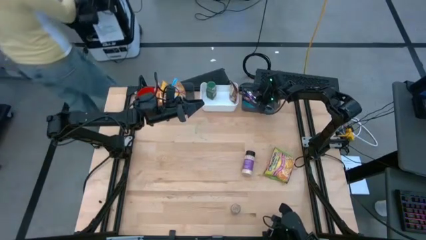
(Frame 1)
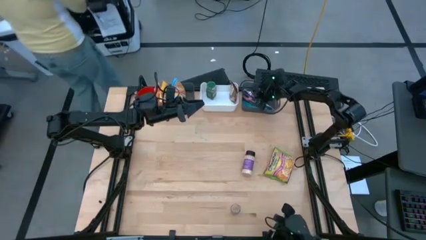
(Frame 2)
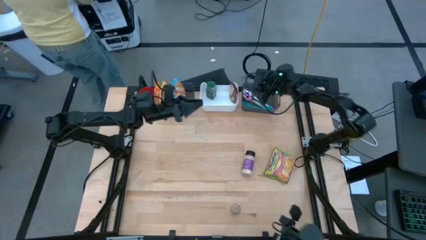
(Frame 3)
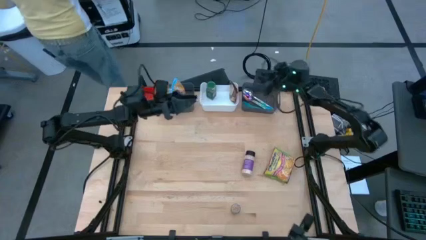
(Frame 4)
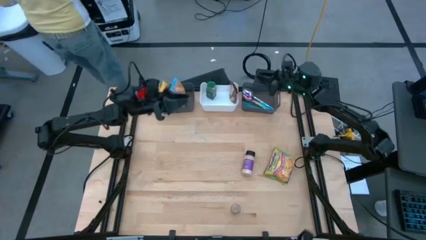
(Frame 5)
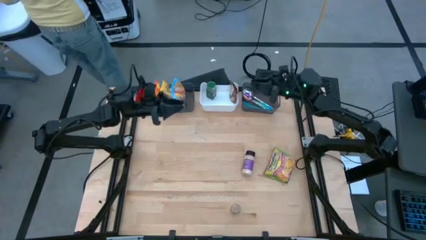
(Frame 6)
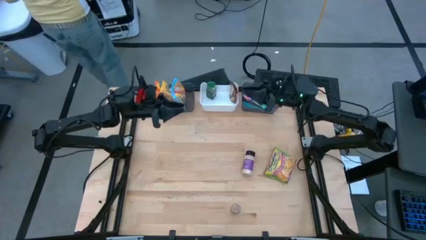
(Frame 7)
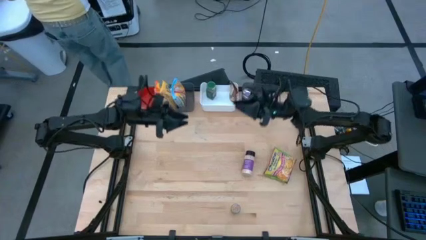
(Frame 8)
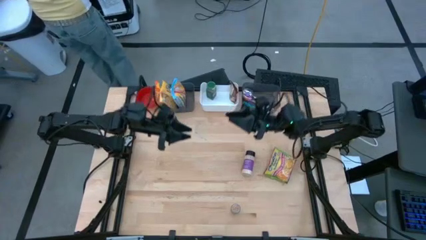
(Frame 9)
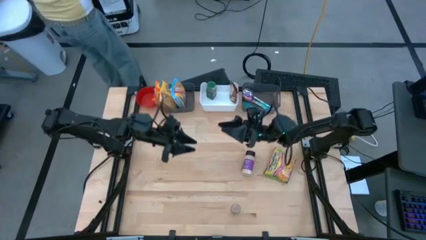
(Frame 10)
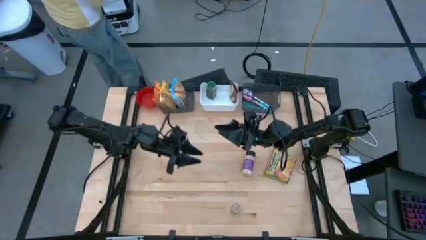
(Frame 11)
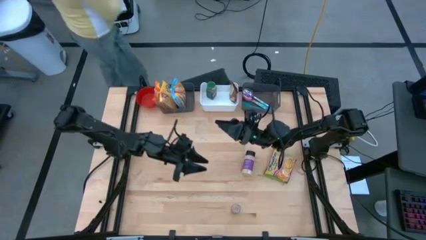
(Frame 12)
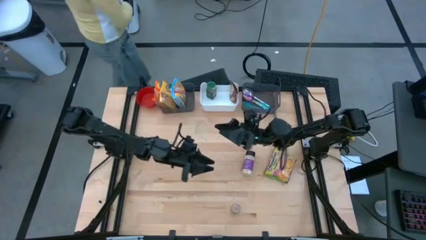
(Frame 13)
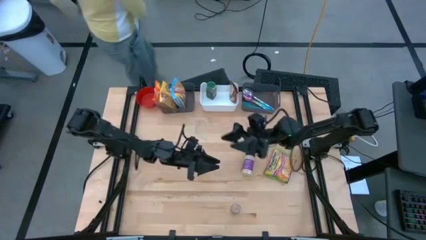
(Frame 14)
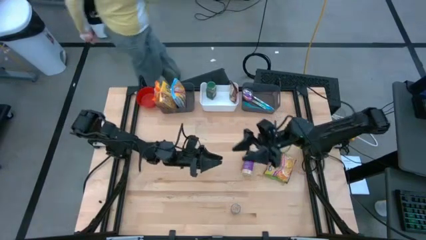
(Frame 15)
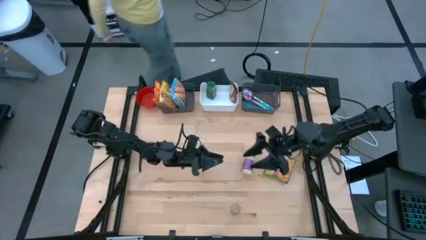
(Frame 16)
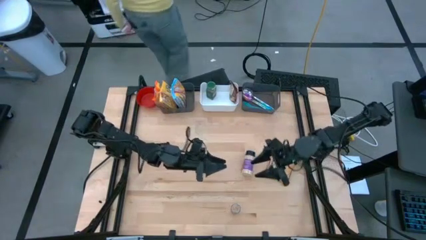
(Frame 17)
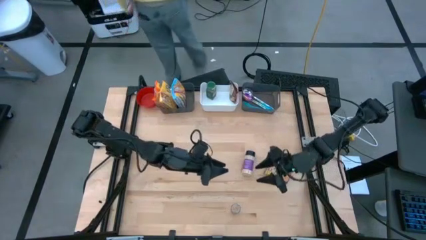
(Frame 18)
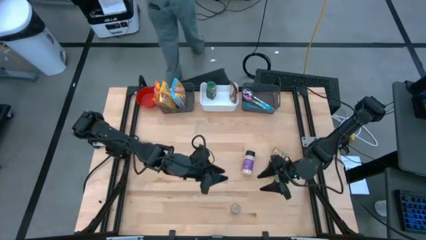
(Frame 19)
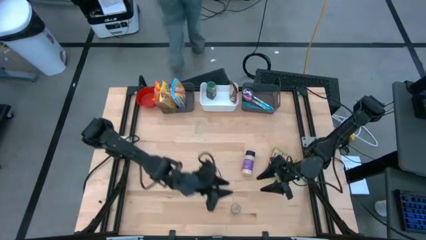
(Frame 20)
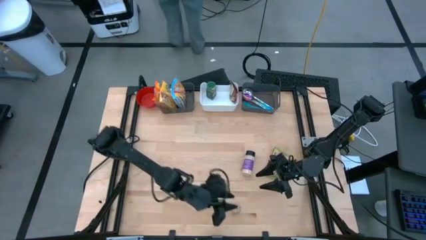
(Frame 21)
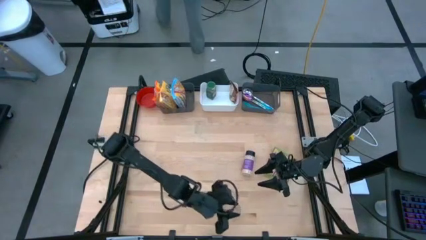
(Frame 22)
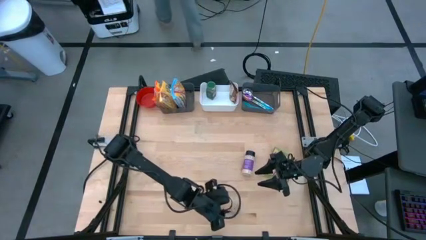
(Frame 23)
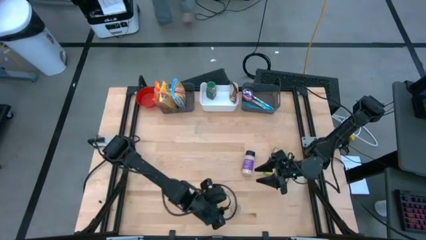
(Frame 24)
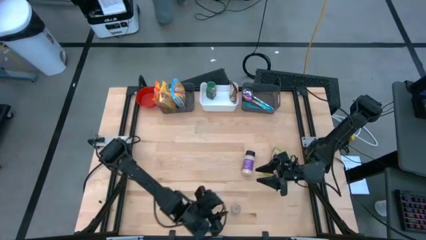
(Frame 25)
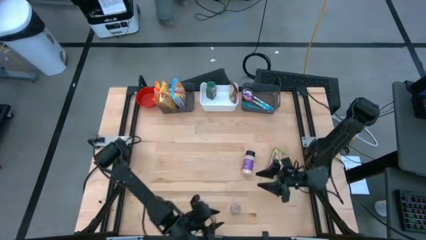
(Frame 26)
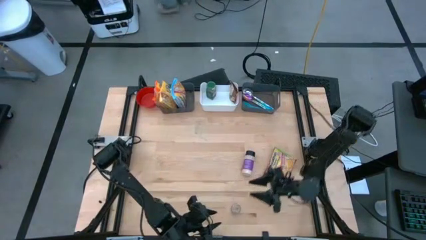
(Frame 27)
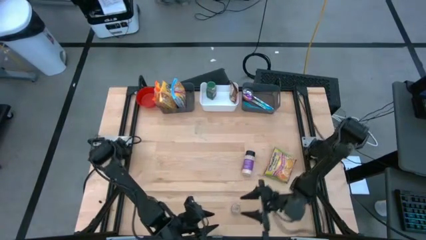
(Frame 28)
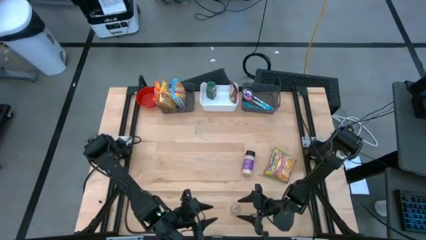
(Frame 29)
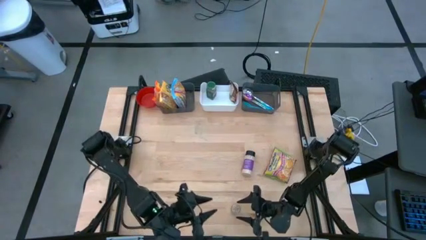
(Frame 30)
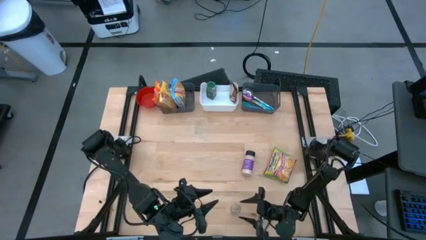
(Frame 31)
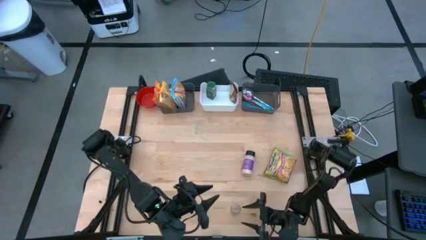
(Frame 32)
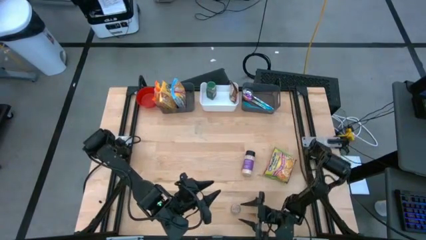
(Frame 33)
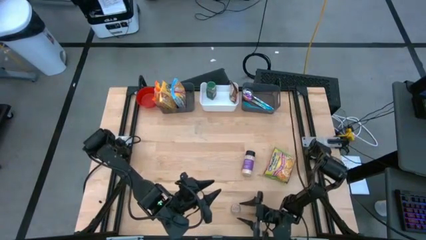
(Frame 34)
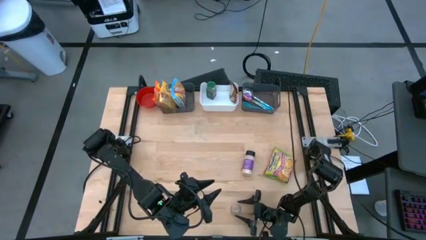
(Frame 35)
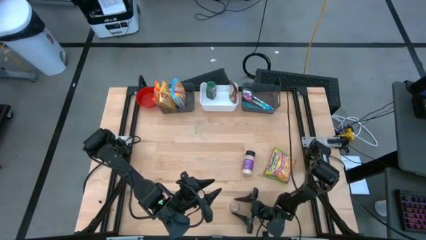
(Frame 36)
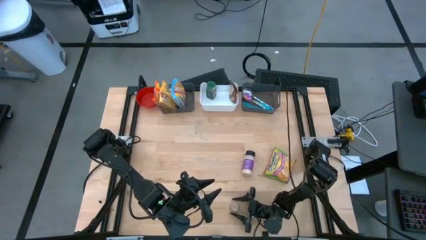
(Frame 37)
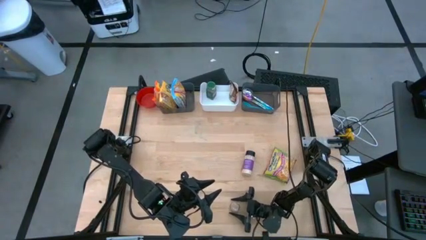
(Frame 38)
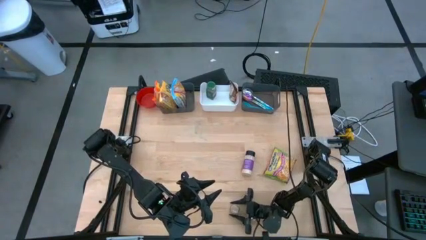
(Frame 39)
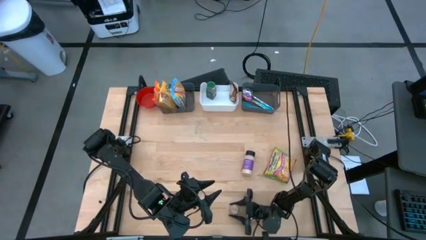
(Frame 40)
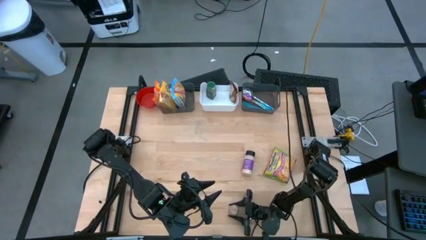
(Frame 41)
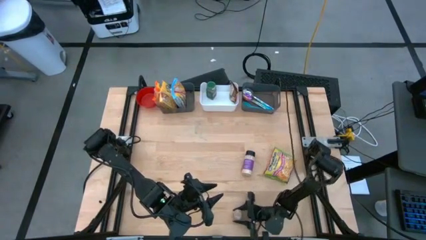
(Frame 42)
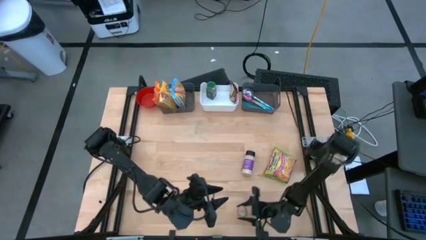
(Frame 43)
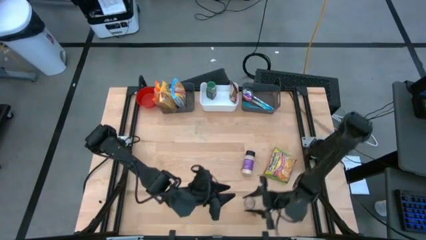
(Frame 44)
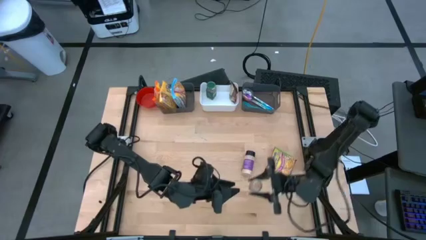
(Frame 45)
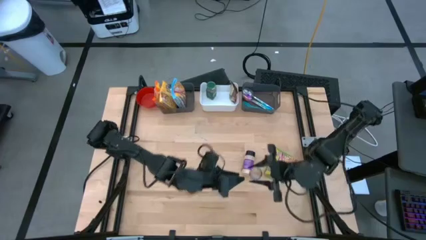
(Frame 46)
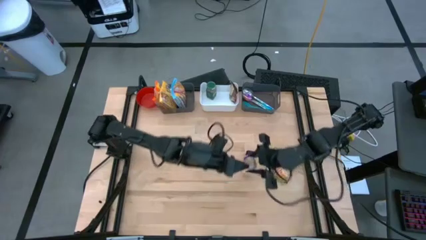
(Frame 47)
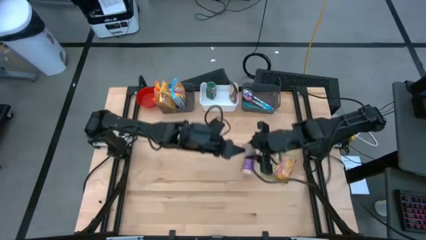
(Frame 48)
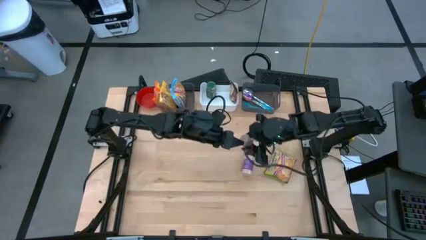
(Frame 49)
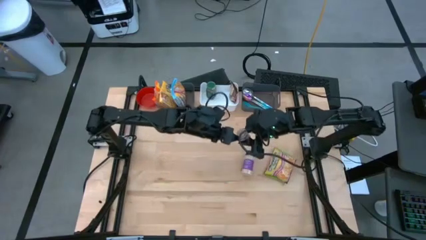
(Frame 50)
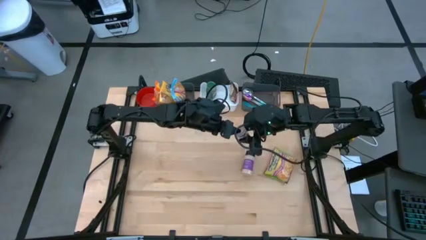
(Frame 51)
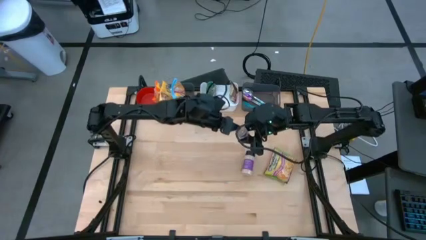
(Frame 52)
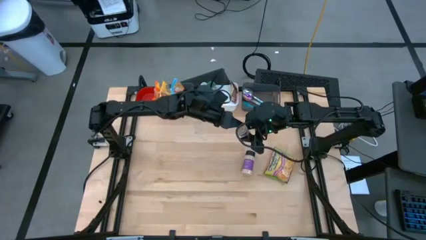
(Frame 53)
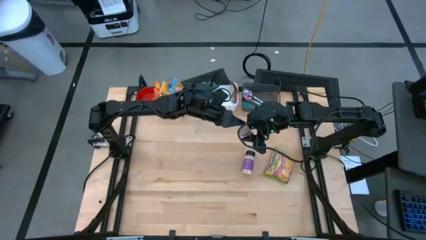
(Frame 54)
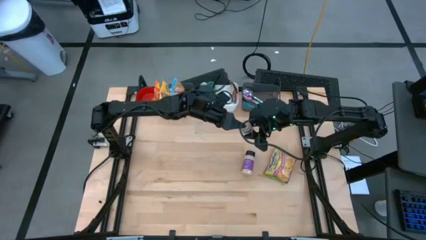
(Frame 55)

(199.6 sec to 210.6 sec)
Task: Pick & Place Food Item
Put the brown seasoning bottle into the white bin
